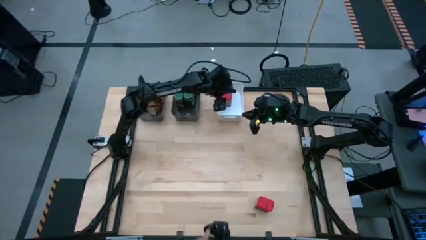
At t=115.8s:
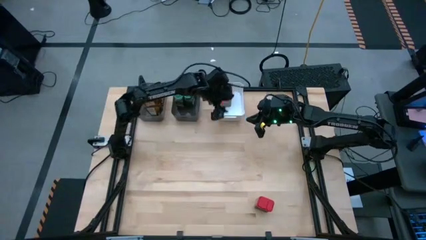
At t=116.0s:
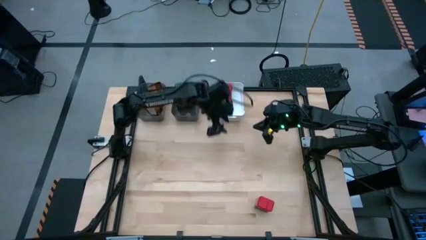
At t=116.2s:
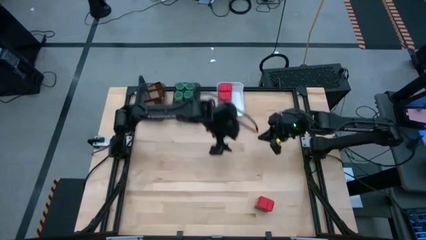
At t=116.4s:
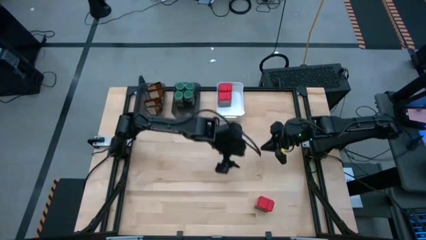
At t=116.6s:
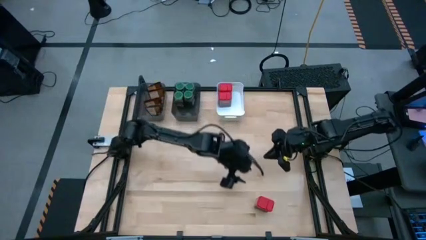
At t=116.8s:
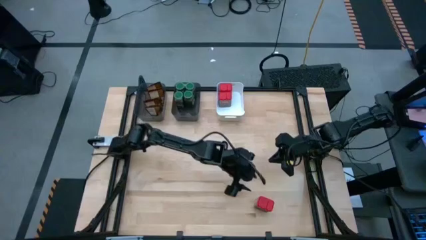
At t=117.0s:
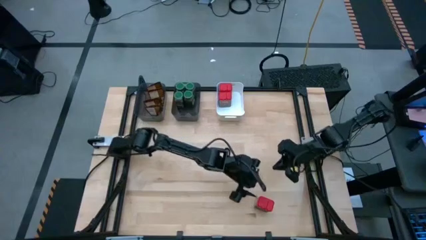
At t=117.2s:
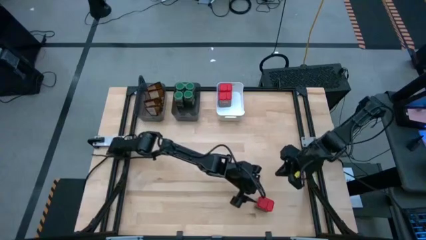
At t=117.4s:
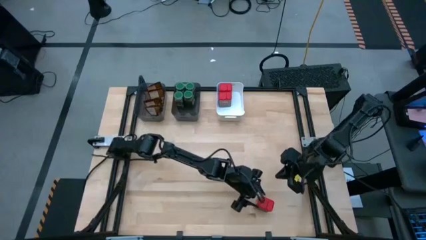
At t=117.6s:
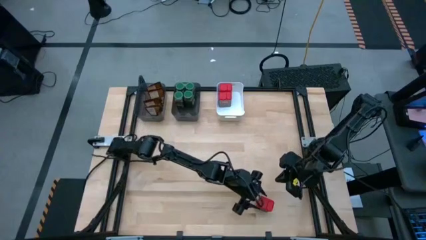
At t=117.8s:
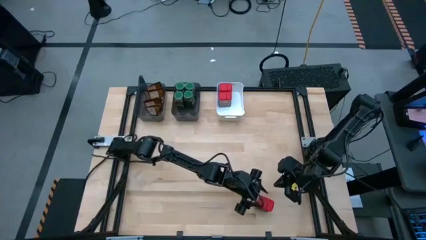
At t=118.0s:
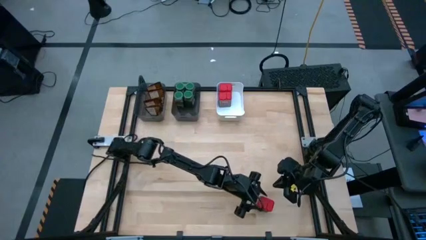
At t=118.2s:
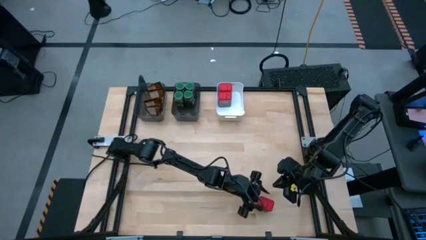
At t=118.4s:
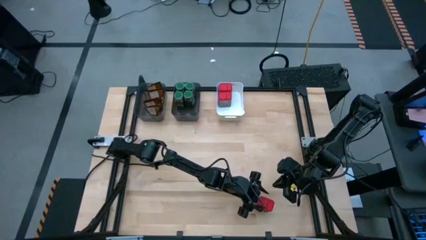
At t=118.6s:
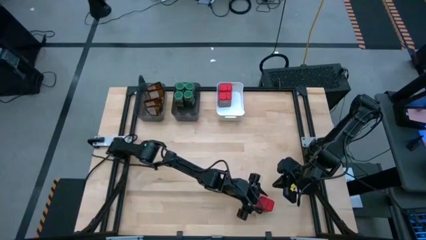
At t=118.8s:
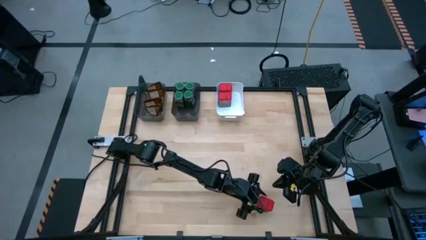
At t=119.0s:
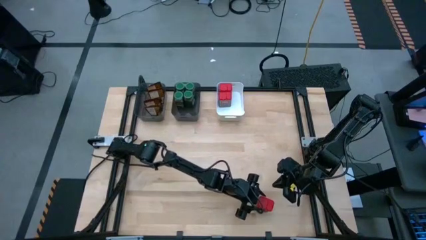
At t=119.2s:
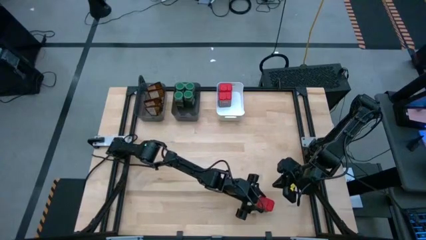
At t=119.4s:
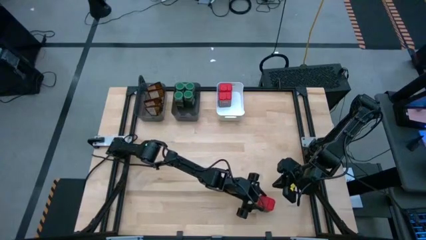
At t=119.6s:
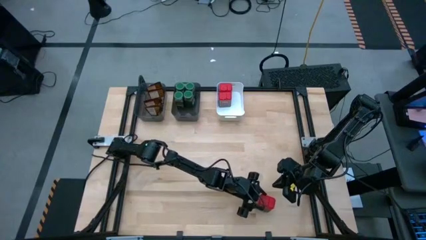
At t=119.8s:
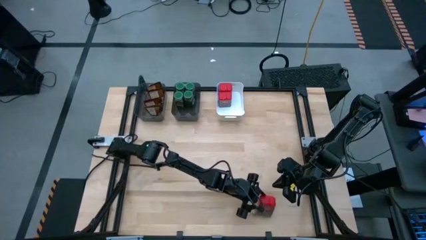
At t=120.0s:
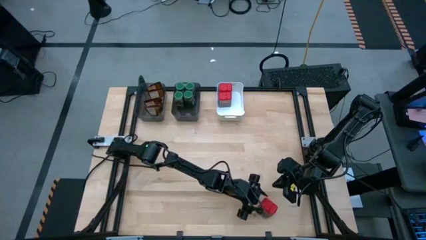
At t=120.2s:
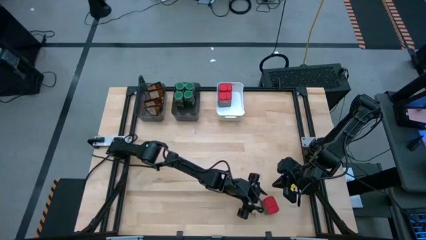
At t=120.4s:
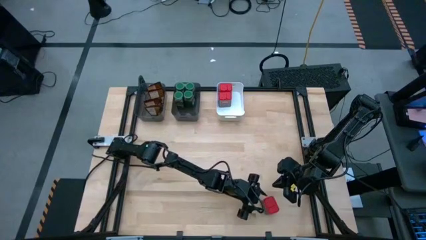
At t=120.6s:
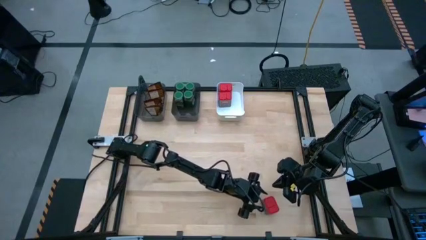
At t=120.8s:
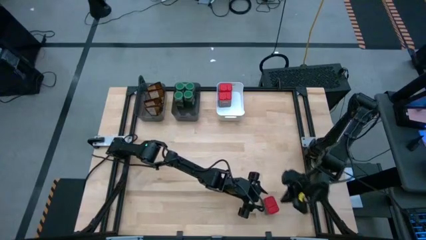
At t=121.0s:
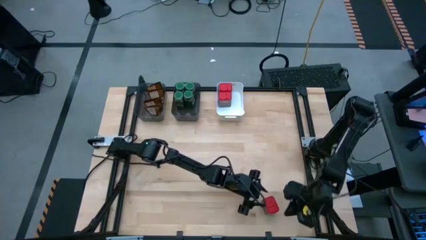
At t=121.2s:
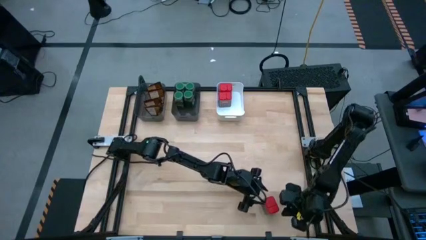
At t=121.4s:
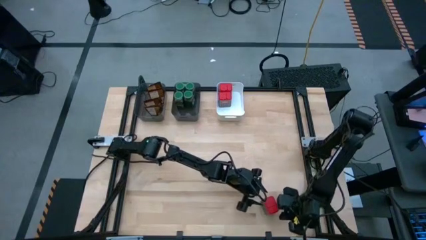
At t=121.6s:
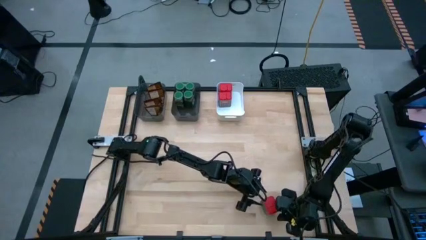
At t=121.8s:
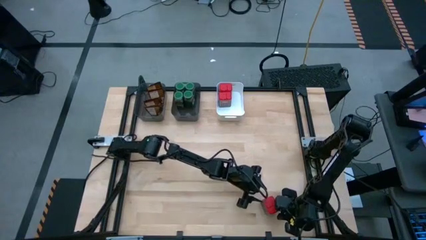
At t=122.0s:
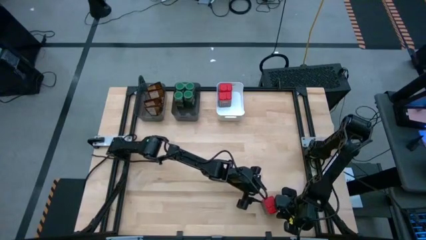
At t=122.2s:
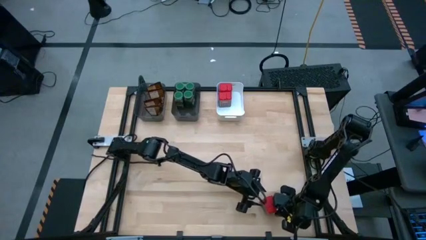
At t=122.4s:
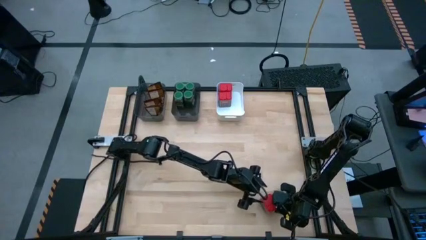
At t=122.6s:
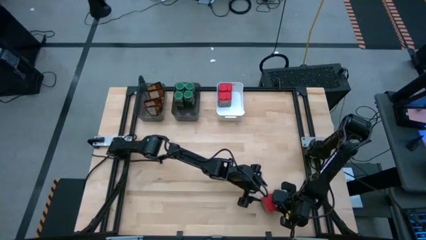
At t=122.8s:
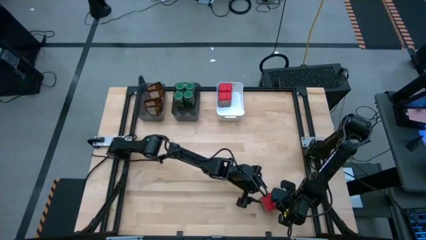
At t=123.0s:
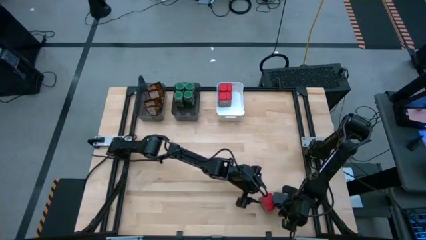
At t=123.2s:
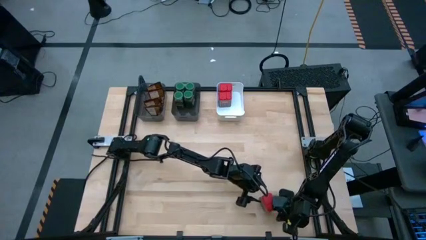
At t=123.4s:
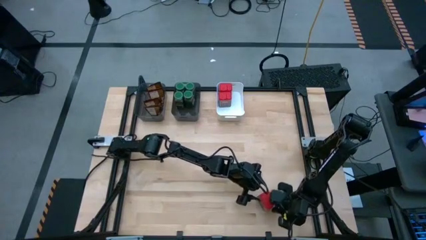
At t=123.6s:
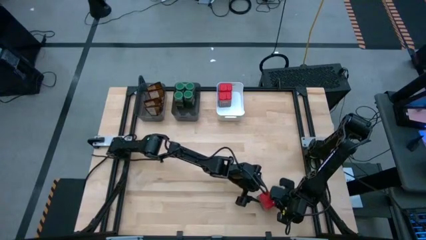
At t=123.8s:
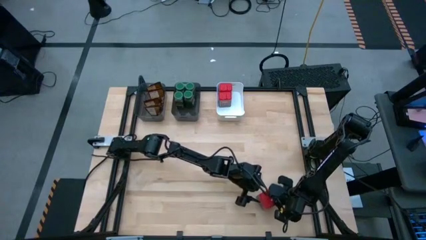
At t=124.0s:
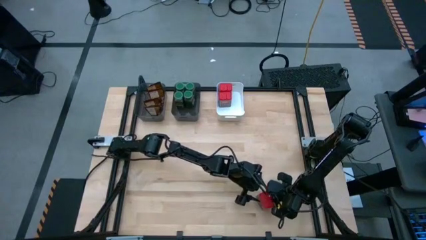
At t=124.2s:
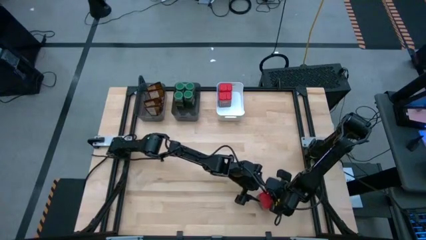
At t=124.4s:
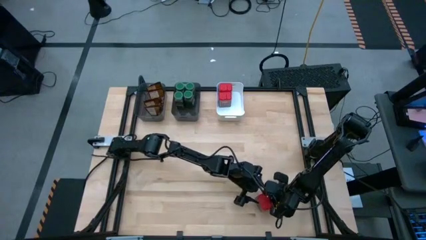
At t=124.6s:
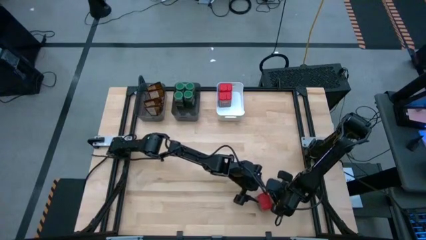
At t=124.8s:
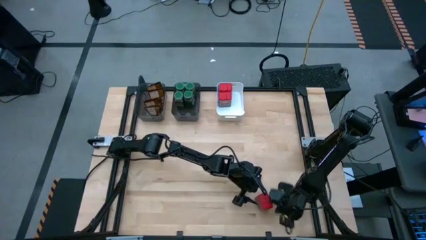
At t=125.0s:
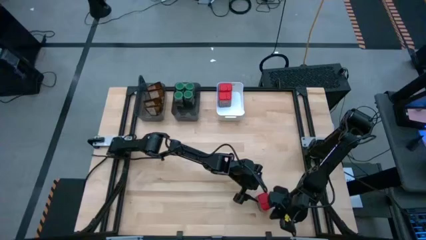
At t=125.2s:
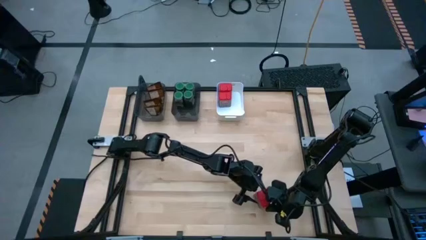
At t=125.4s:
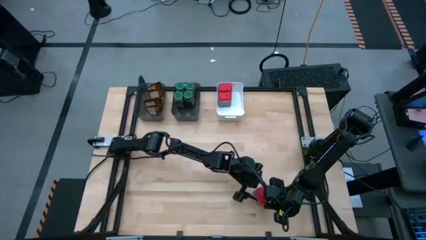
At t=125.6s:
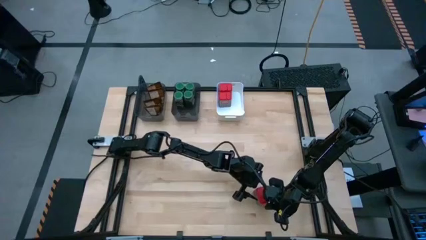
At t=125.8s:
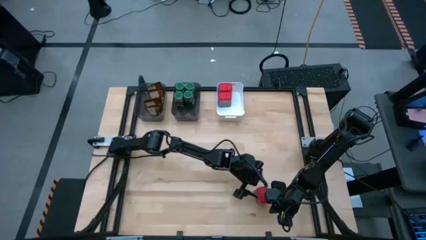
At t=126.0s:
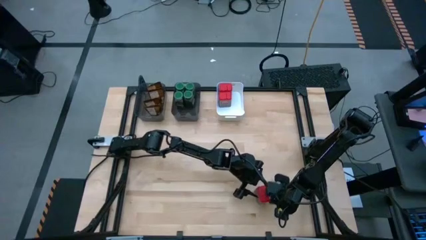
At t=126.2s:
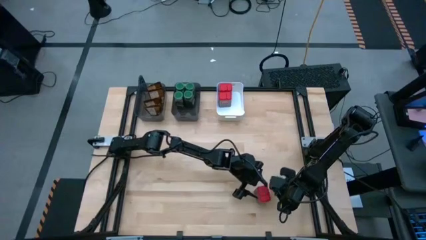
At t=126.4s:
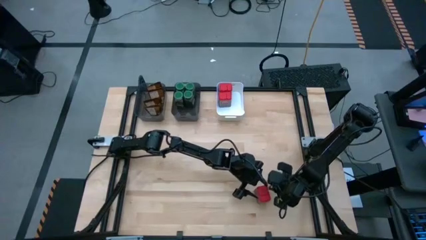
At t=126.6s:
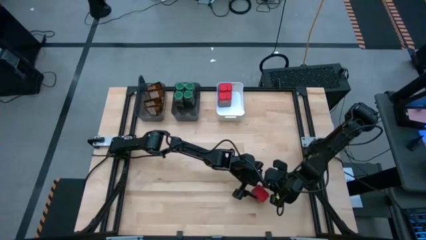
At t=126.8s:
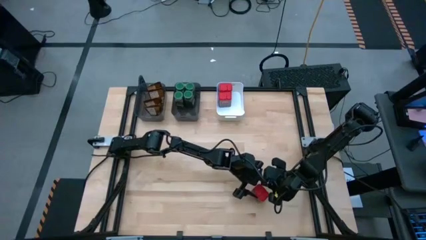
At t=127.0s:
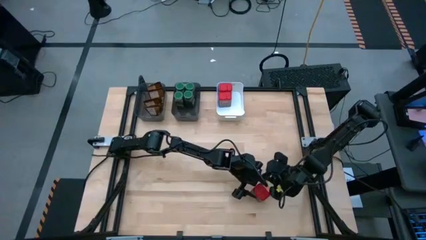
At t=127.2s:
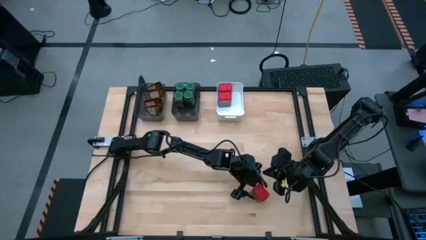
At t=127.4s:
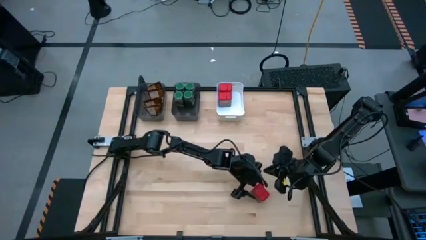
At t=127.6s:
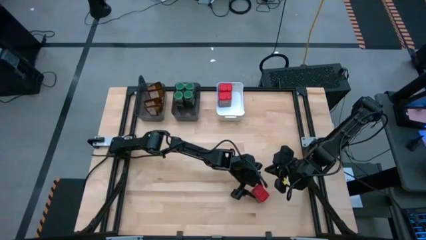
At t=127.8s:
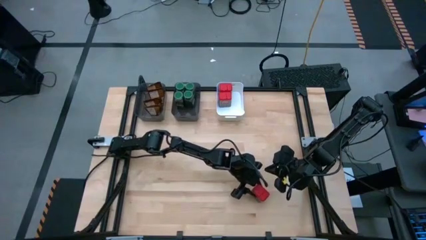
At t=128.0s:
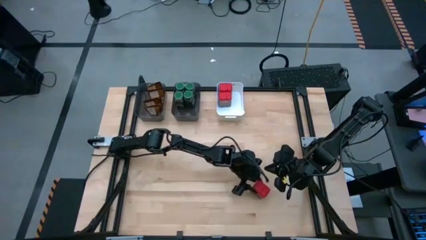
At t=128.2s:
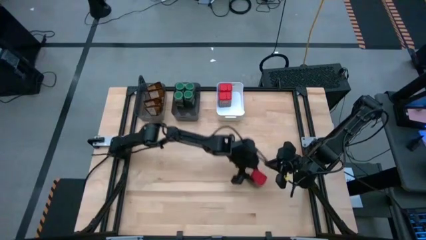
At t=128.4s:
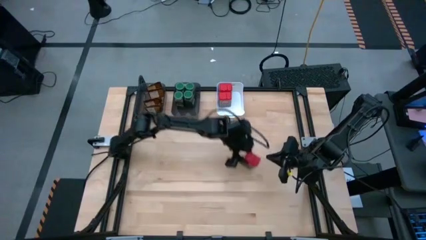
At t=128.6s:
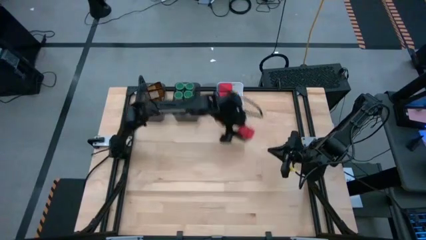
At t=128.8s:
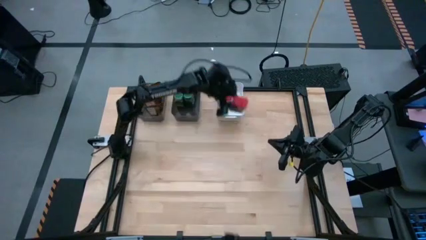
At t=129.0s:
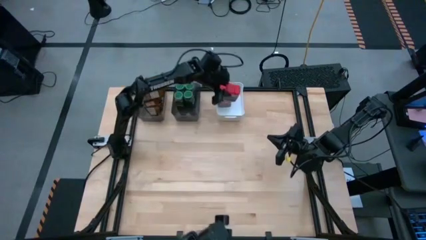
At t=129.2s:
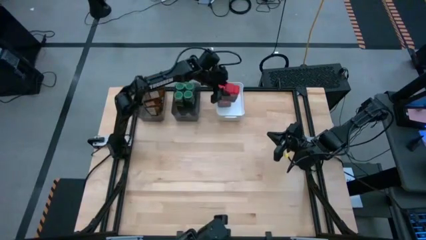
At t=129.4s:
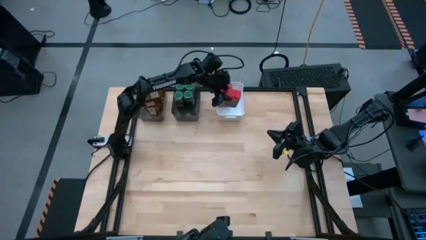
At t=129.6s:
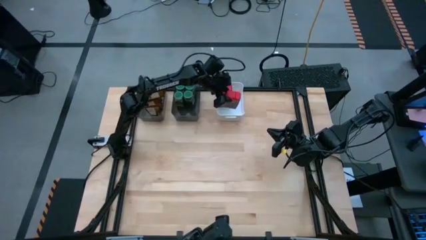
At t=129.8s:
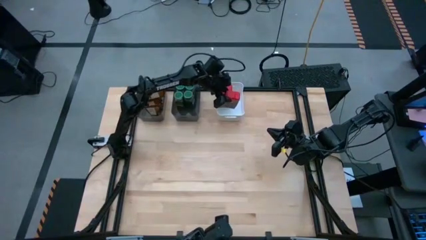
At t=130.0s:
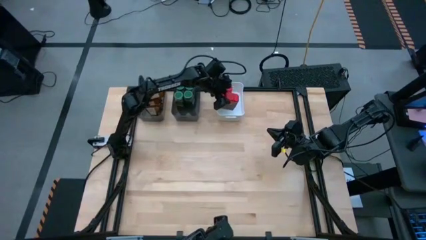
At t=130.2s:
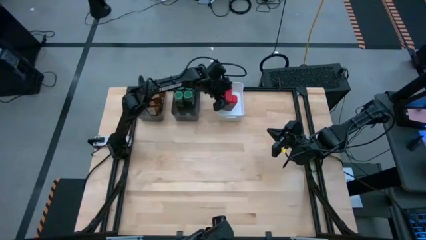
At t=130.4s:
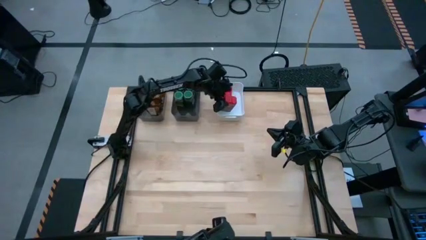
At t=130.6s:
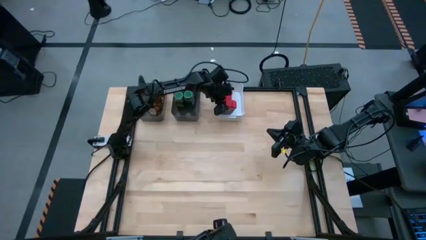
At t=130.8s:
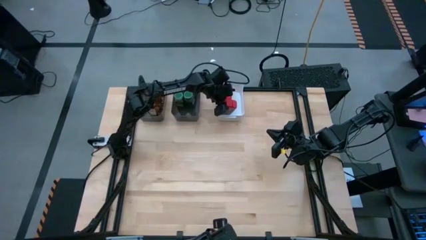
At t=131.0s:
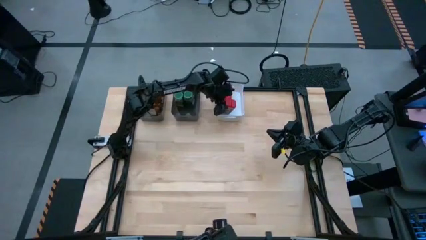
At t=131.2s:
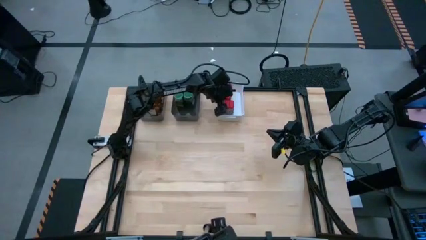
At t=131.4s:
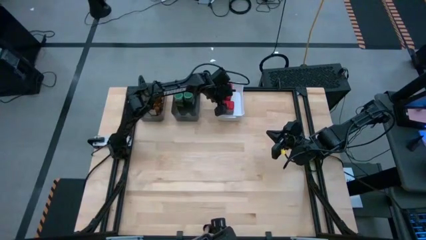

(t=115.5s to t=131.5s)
Task: Sort spices by type
Put the red seasoning can into the white bin

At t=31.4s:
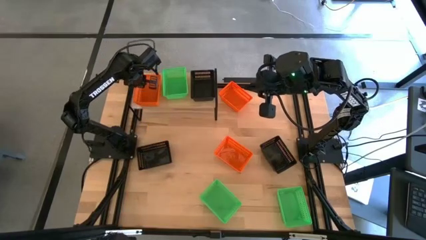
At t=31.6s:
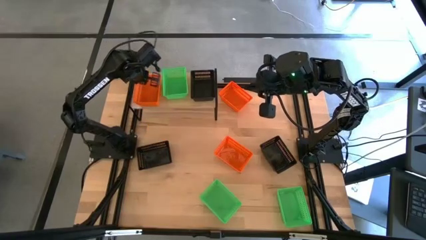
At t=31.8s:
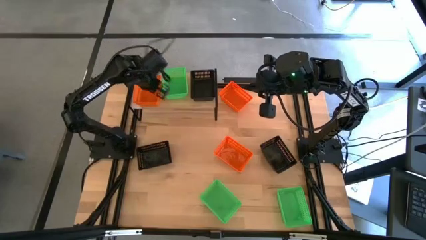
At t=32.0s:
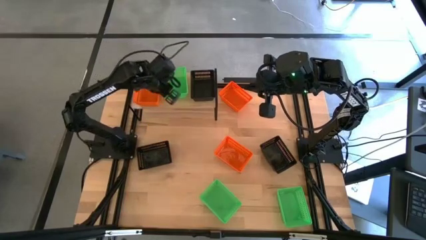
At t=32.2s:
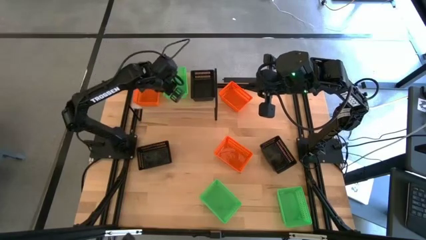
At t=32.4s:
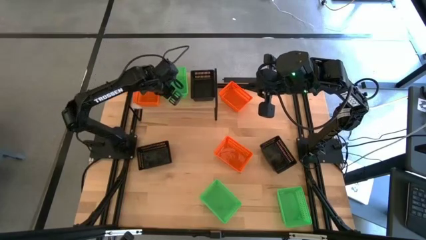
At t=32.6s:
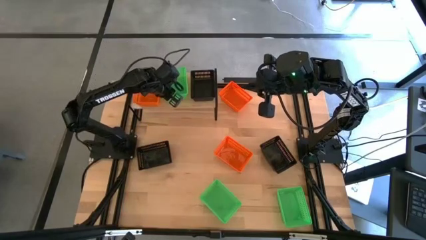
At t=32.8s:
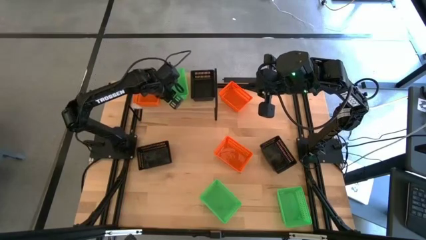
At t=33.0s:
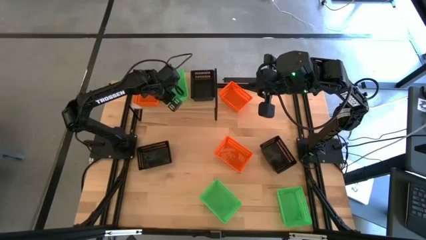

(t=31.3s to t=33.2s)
Task: Stack baskets on shelf by color
Adjust the green bin on the shelf
